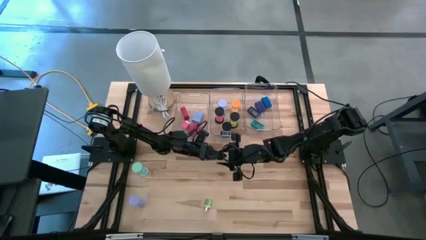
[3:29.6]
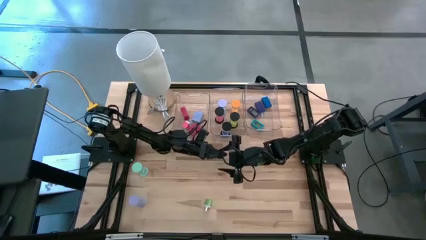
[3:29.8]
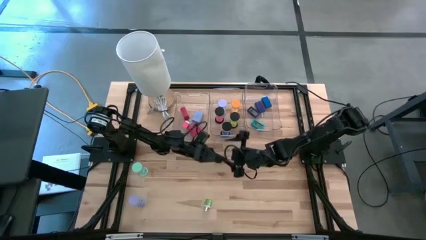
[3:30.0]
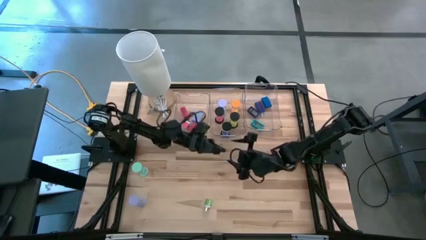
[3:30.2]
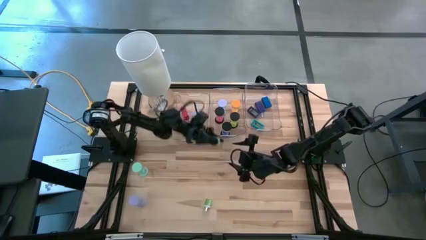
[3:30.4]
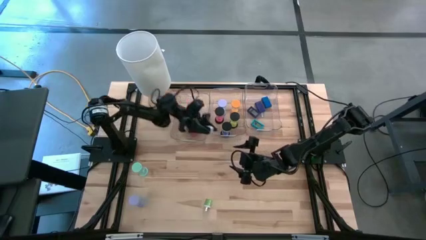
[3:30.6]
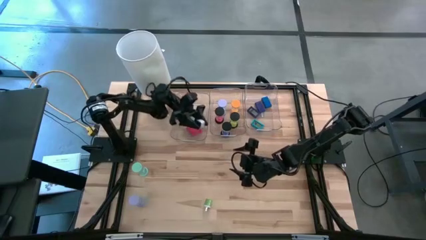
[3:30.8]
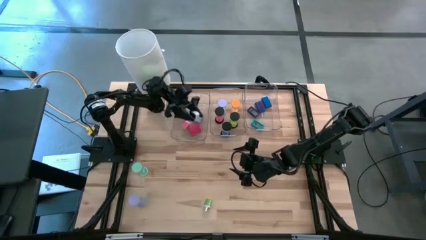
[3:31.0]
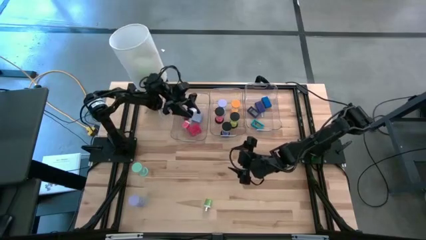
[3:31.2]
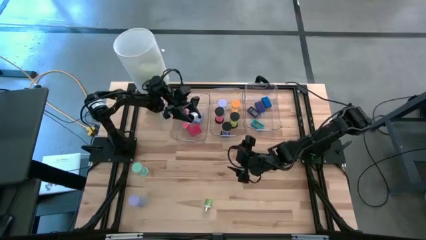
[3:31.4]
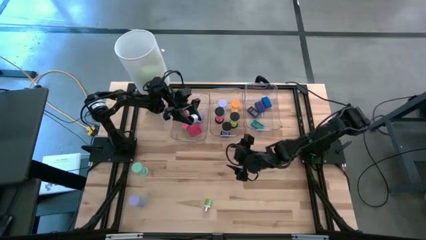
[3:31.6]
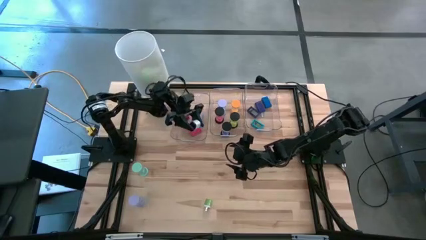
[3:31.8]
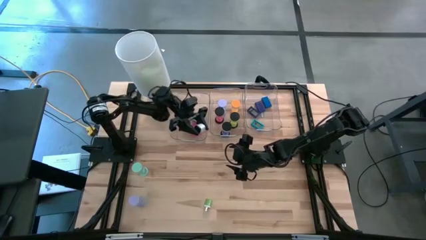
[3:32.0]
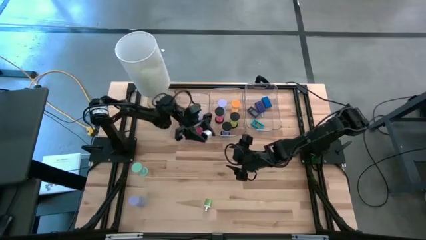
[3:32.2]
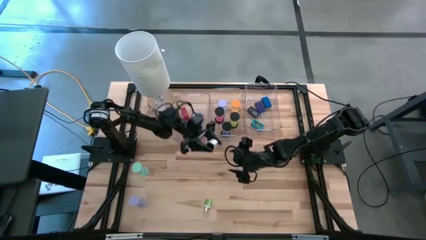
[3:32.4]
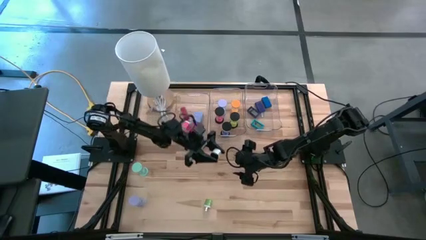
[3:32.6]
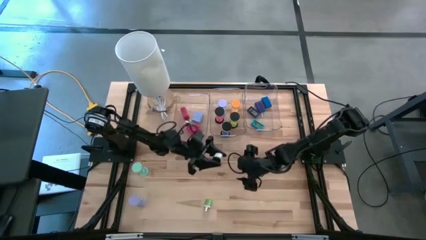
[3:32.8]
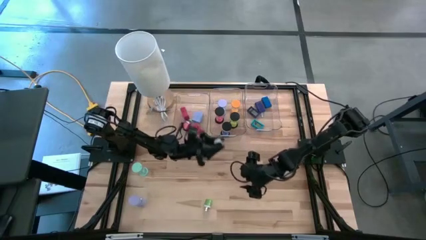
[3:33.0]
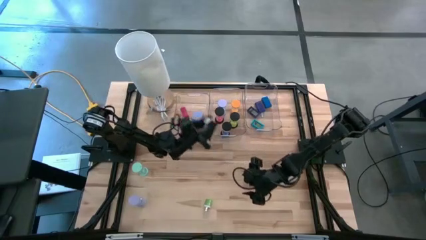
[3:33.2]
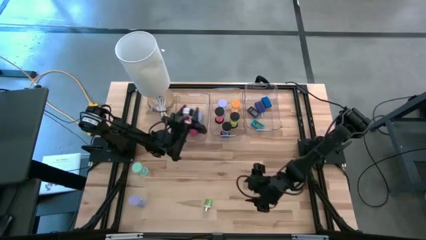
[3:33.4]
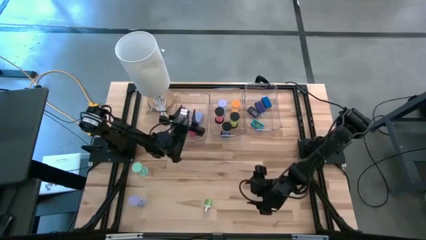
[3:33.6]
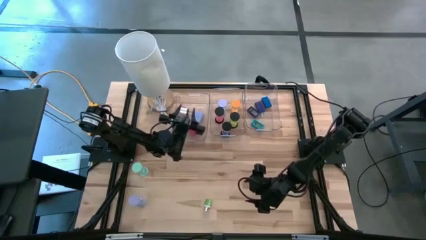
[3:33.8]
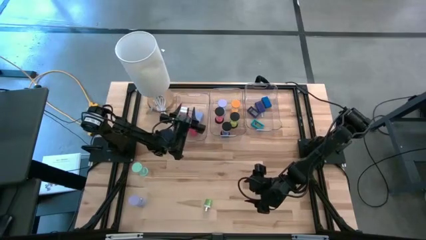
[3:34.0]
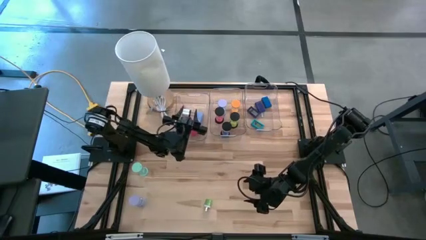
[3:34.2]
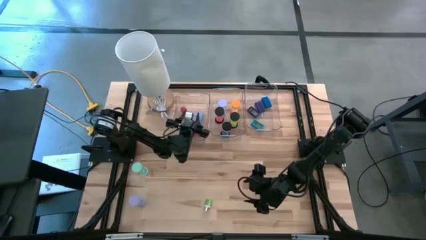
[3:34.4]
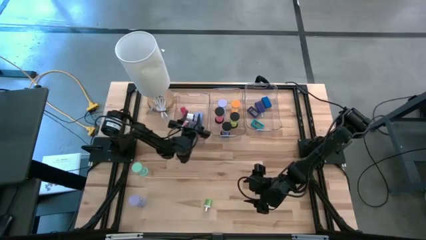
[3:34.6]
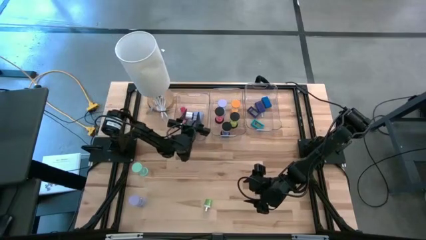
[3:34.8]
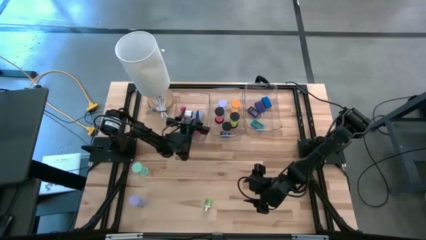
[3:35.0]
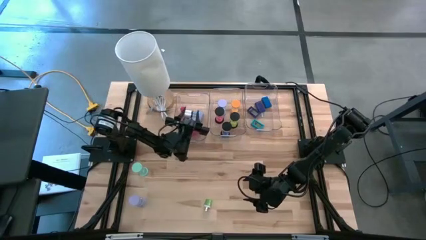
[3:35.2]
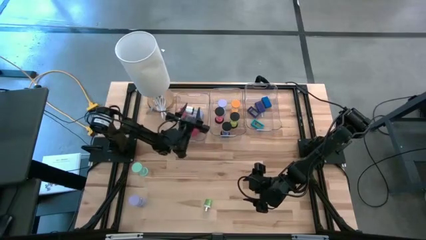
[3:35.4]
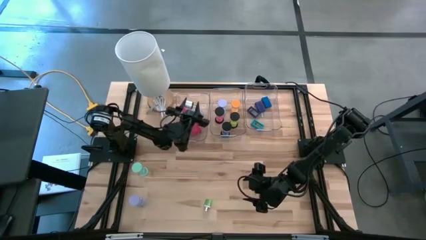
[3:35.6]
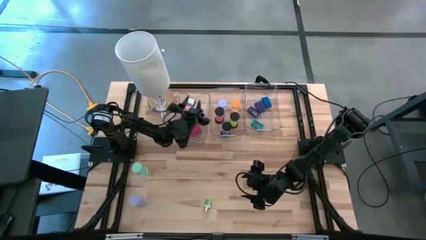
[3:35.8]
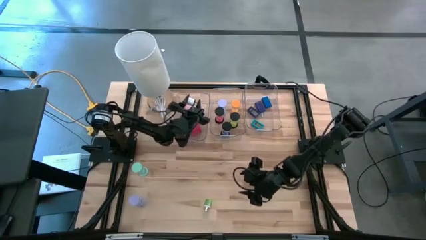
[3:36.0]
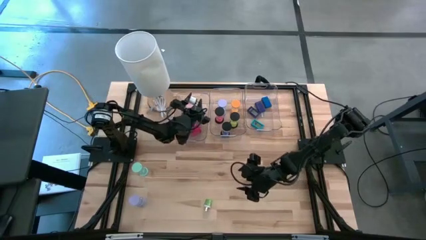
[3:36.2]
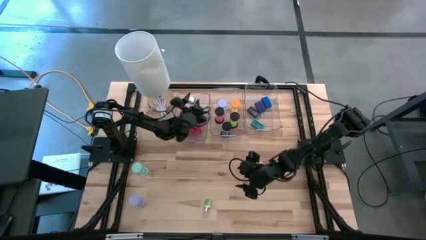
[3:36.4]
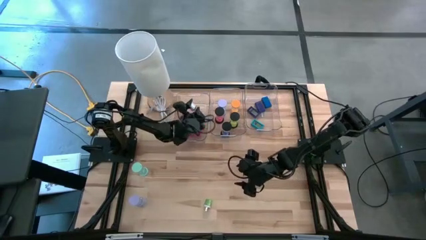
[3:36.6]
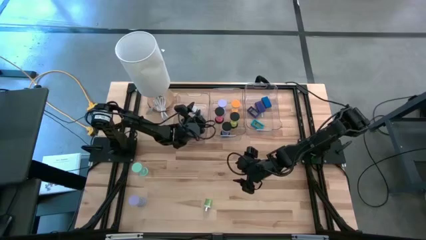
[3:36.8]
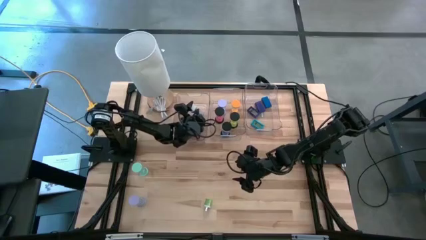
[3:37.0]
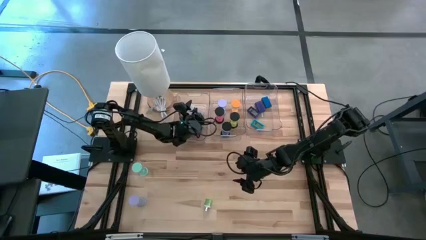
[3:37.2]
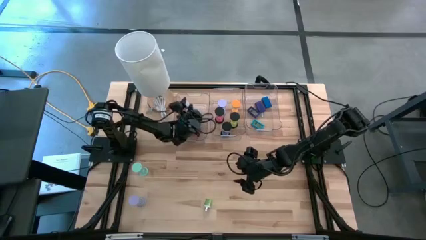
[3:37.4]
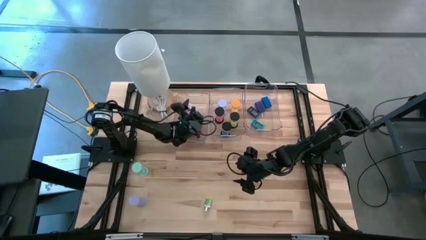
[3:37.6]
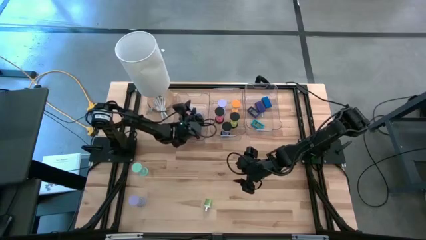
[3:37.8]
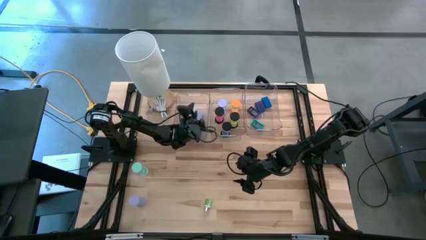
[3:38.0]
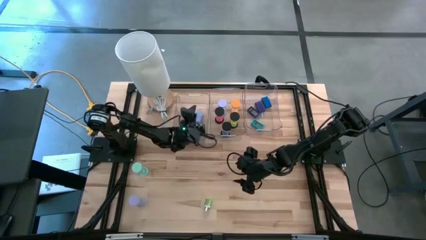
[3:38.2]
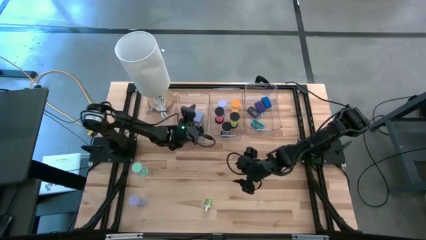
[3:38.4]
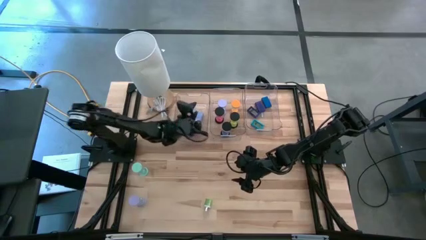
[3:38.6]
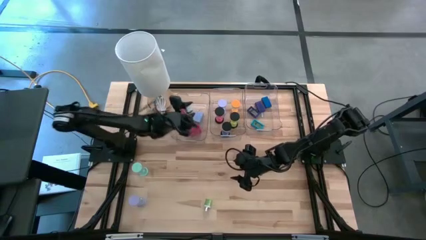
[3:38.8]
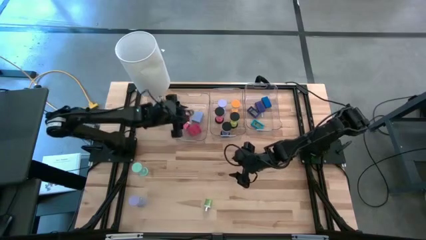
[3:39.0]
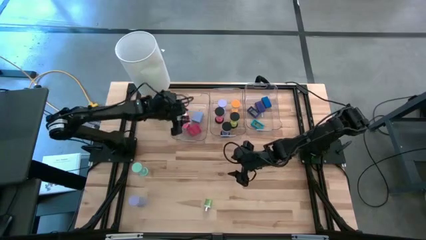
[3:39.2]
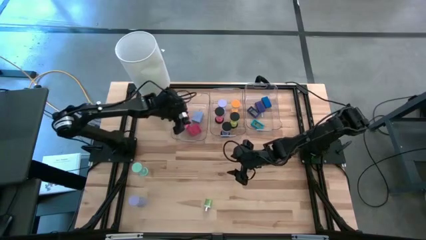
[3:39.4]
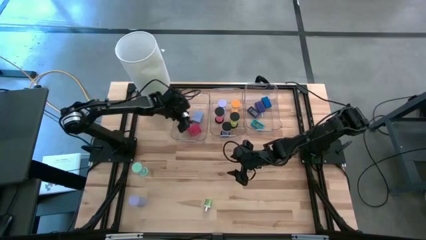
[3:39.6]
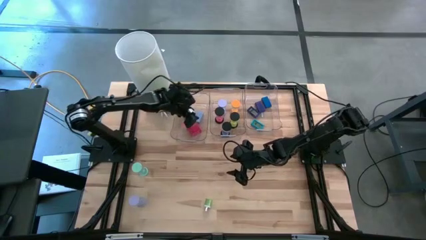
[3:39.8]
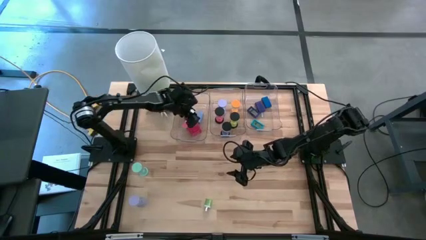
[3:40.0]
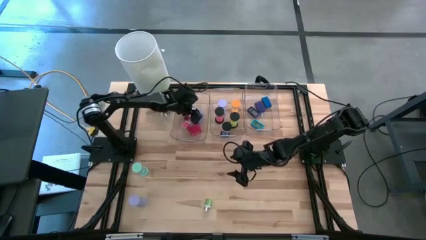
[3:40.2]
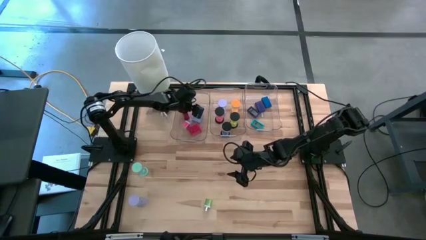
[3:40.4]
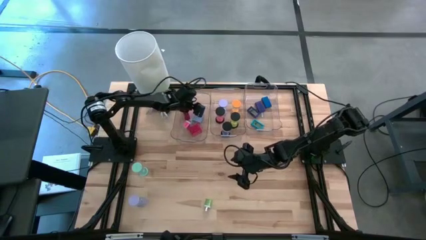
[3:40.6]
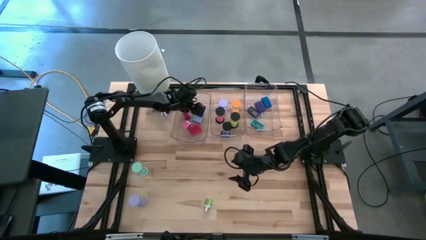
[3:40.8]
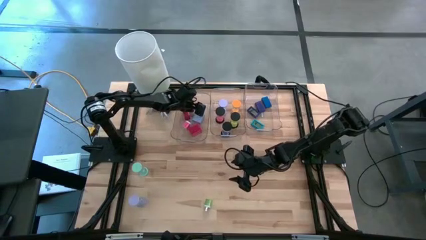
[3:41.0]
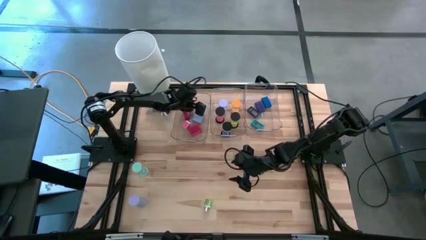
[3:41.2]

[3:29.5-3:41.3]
Task: Pick & Place Office items
Put the white charger adapter into the left transparent bin
